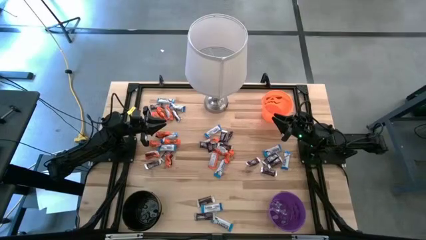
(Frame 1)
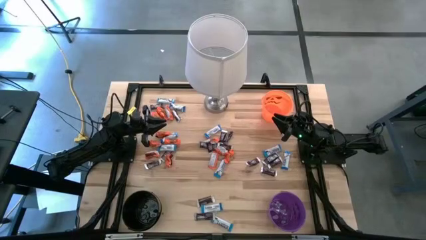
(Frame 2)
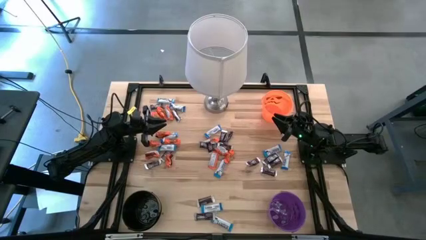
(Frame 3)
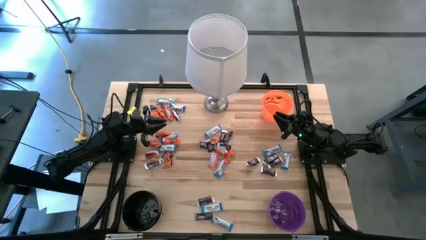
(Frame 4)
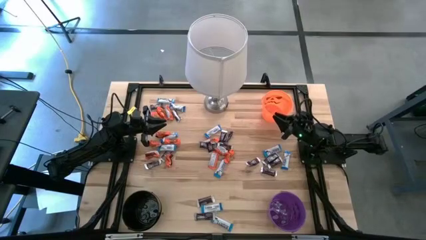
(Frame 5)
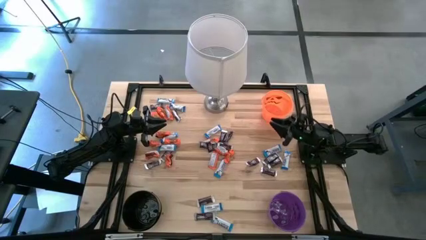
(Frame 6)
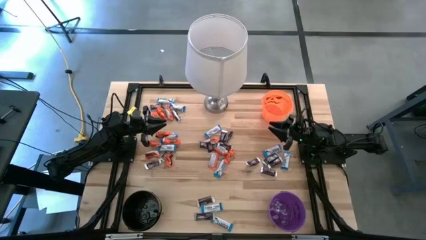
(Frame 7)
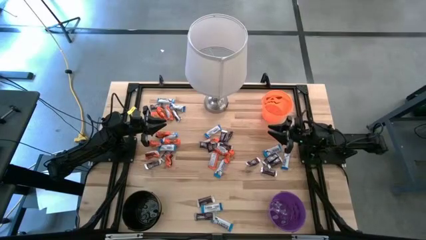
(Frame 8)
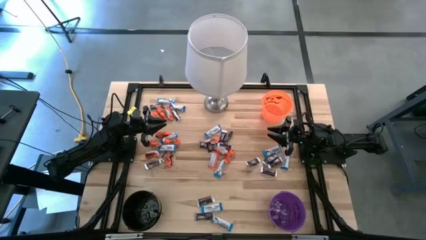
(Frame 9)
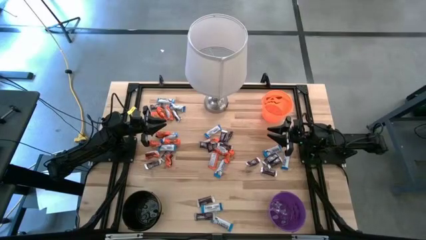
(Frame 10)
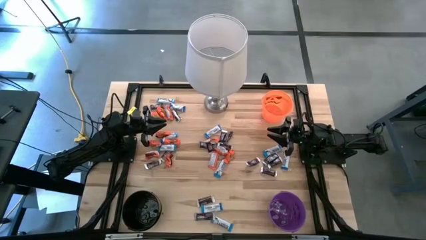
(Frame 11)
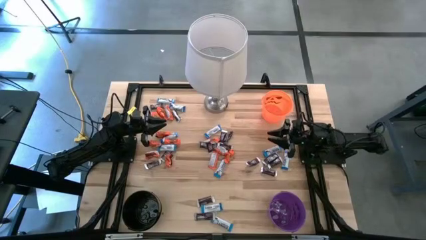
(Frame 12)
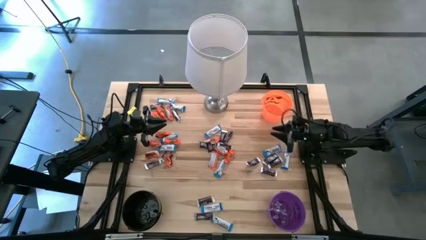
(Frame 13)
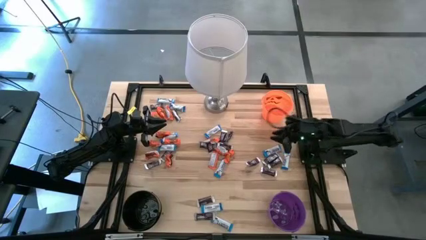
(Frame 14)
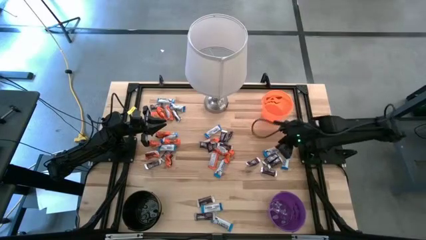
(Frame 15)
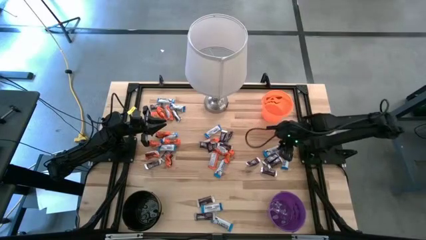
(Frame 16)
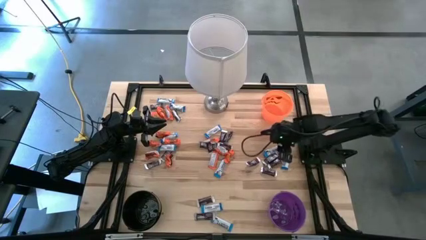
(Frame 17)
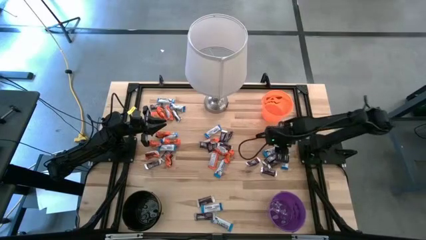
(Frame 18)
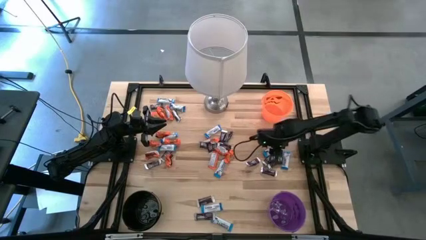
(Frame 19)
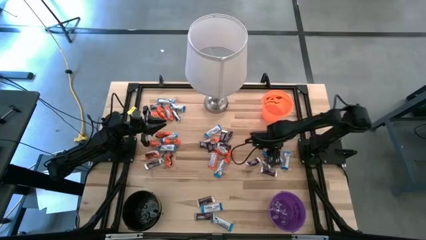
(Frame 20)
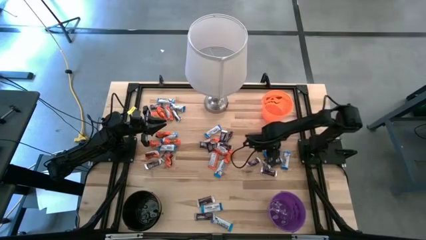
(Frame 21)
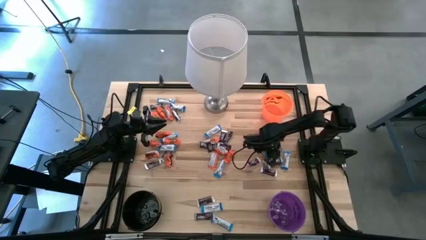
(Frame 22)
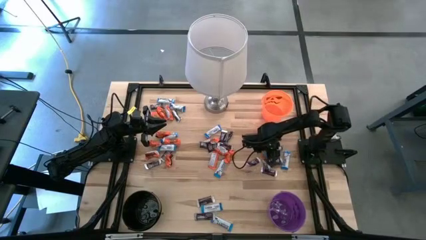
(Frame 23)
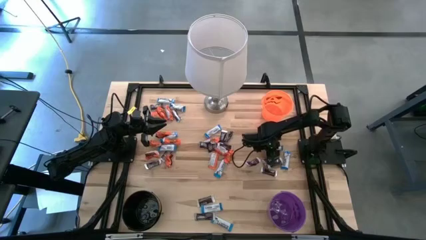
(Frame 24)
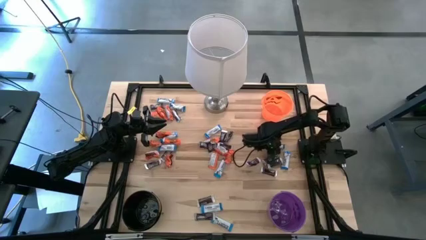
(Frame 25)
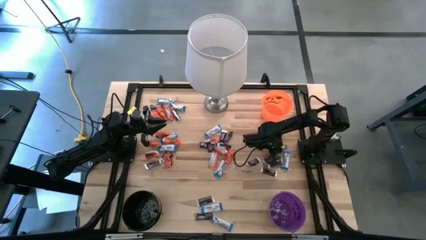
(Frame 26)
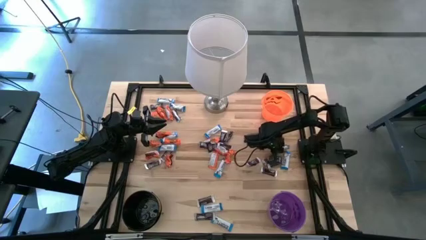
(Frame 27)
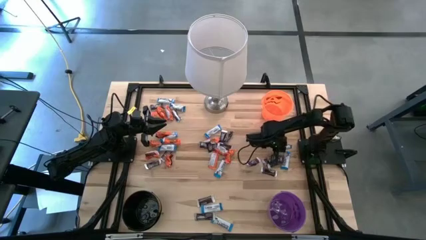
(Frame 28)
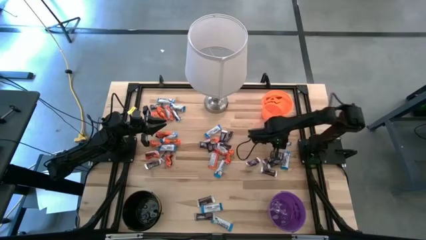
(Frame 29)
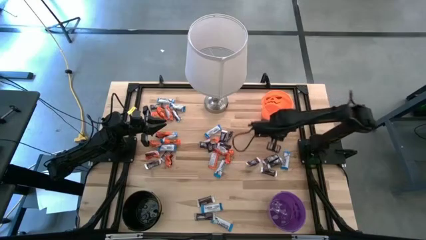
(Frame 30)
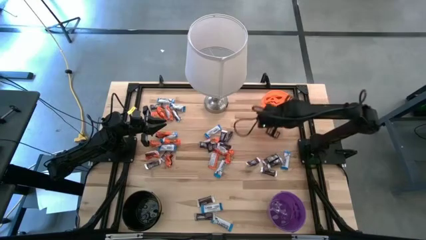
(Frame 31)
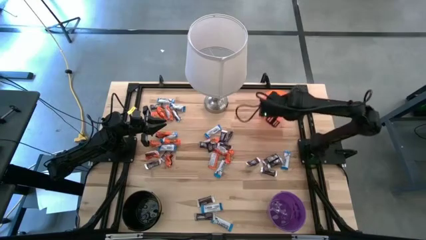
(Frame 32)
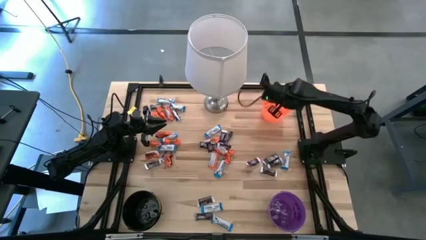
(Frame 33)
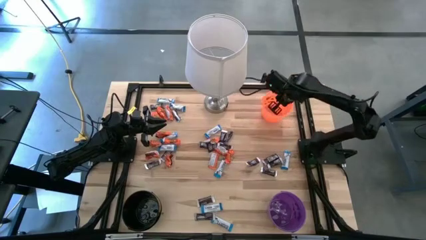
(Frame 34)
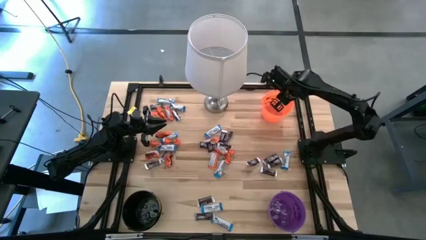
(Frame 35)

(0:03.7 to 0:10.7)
Task: Sort candy
Put the white chocolate bar into the orange bucket

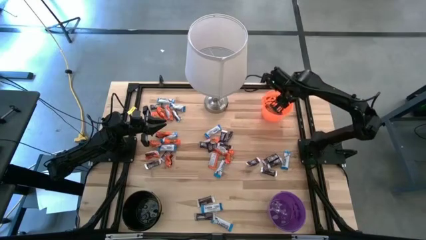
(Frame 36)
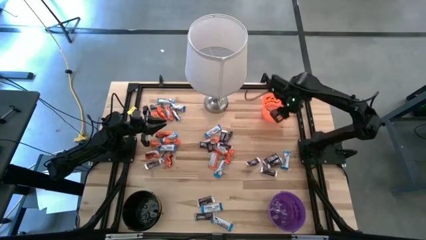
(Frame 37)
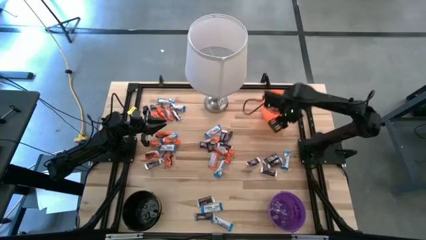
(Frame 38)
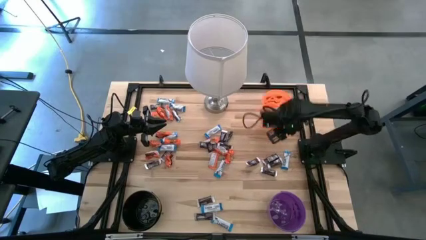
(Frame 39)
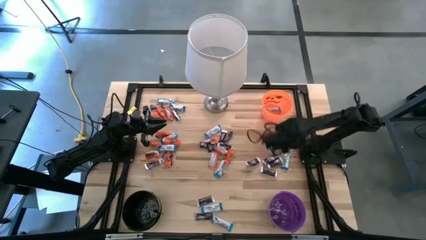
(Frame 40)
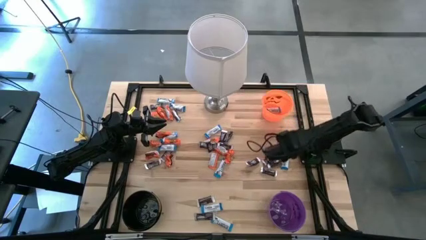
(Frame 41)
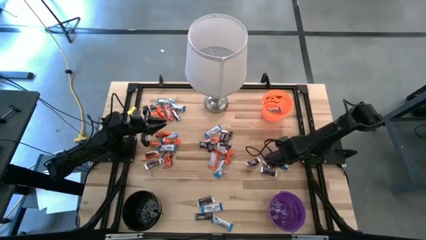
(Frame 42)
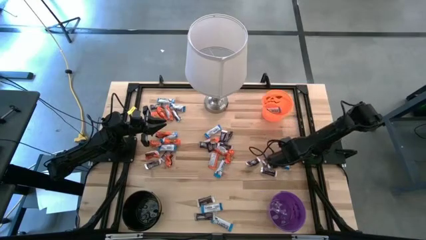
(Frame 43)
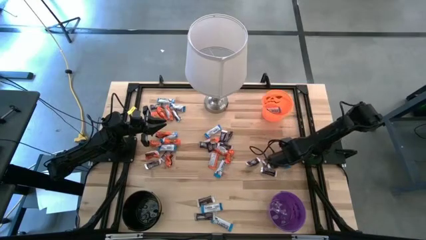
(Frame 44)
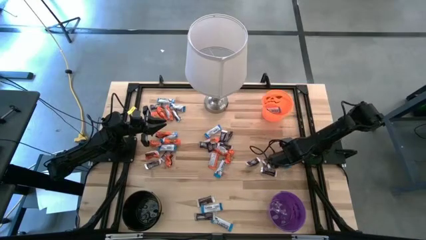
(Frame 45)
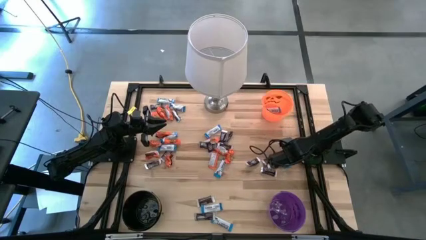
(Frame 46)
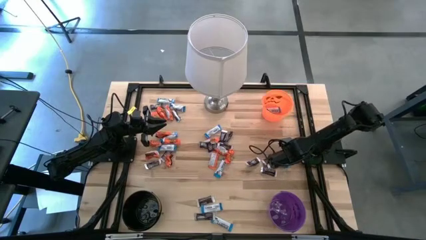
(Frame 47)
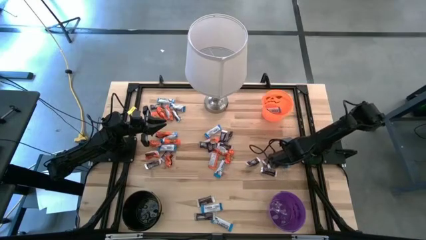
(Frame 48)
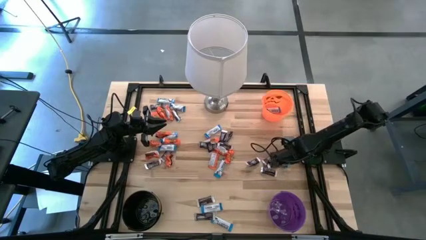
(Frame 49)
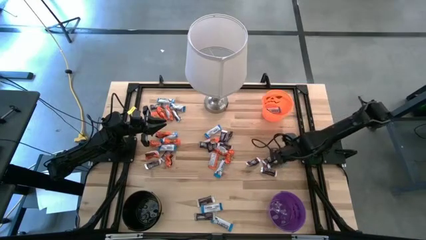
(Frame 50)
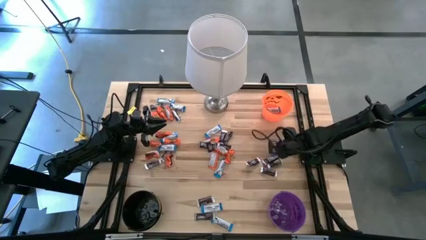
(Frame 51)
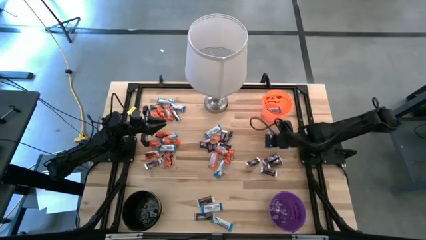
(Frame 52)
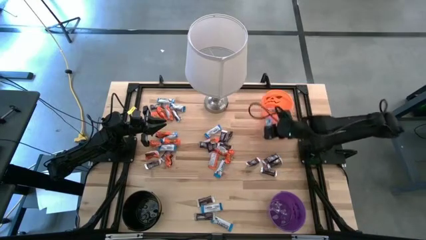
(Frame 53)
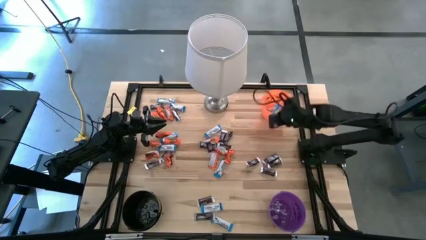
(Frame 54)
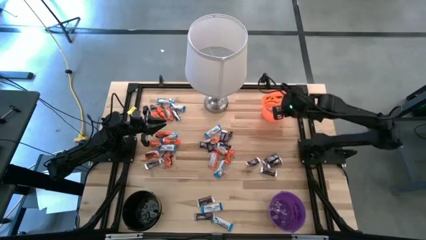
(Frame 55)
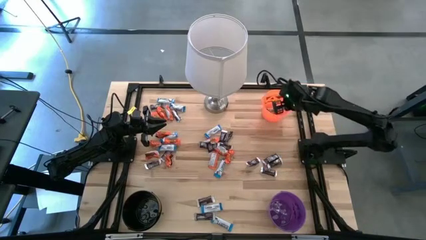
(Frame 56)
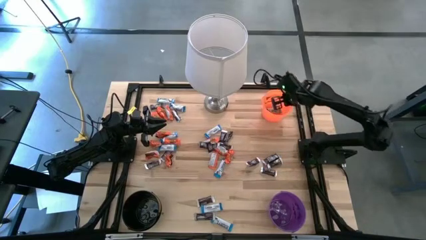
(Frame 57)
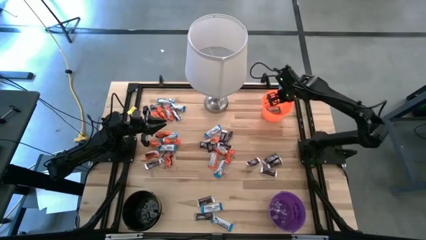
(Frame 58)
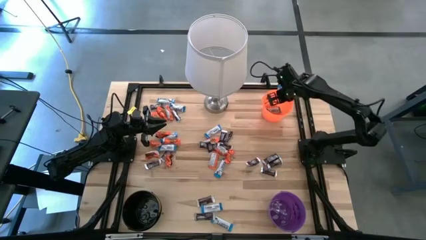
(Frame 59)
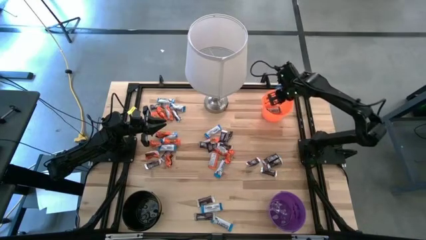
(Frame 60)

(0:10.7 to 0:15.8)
Put the white chocolate bar into the orange bucket

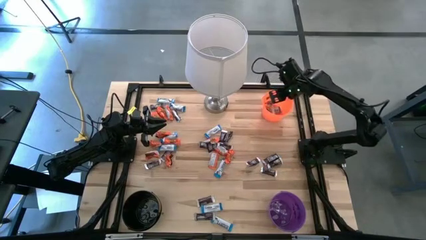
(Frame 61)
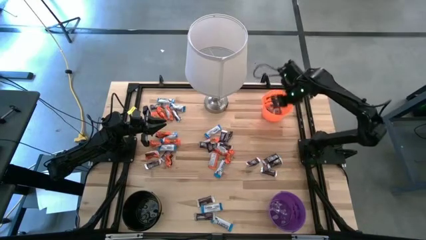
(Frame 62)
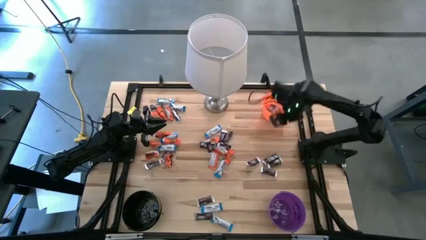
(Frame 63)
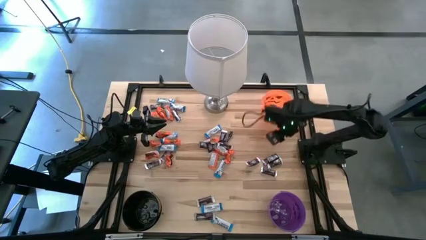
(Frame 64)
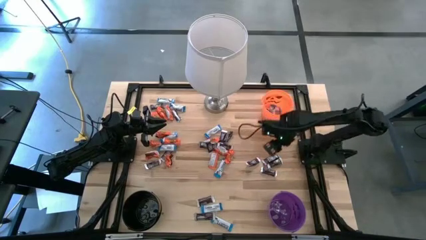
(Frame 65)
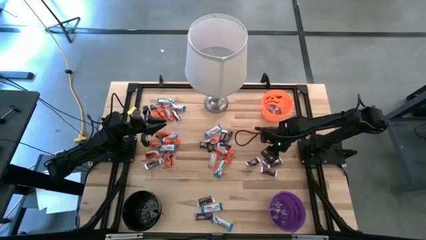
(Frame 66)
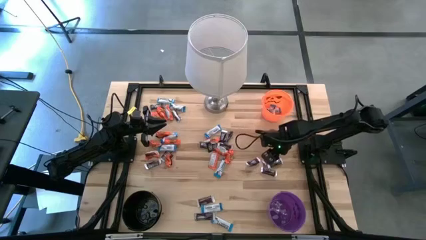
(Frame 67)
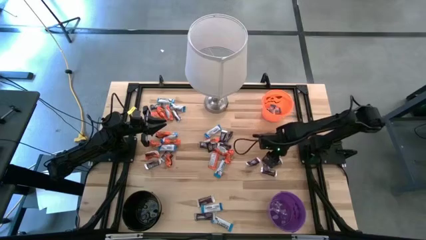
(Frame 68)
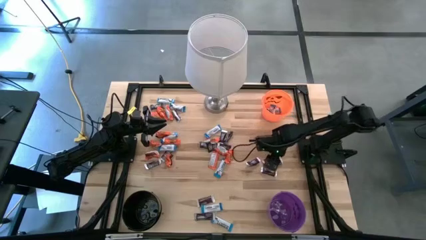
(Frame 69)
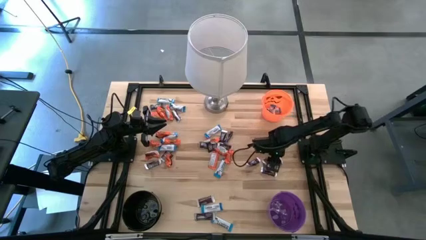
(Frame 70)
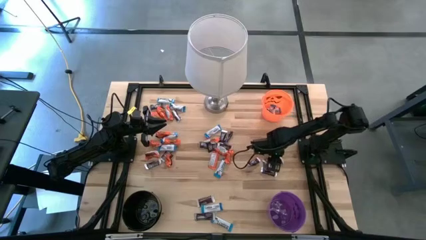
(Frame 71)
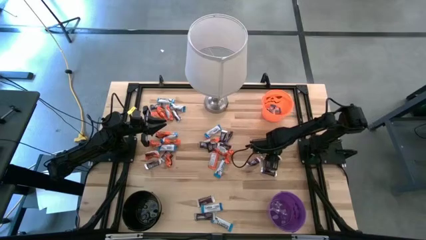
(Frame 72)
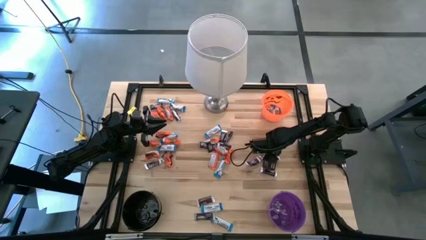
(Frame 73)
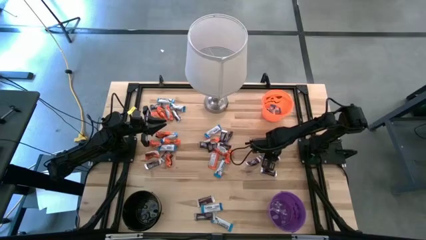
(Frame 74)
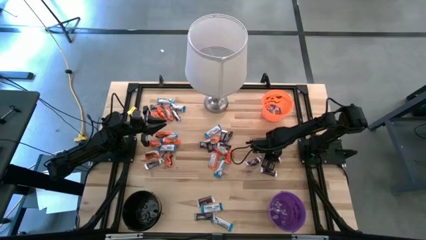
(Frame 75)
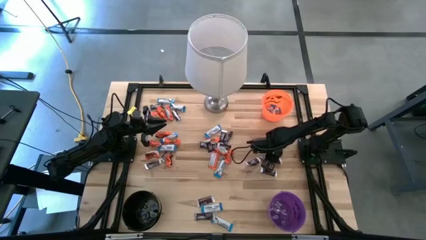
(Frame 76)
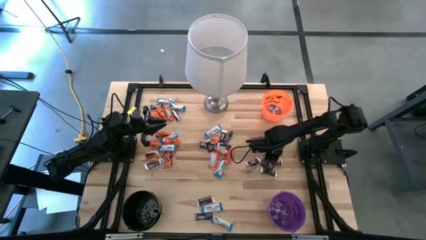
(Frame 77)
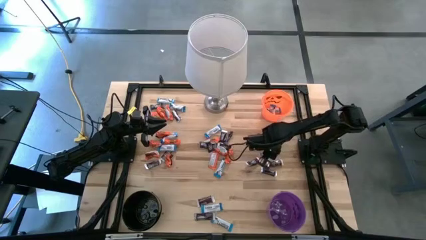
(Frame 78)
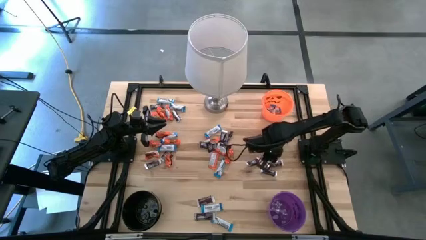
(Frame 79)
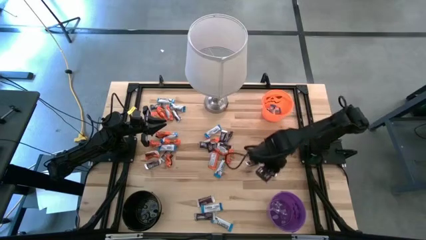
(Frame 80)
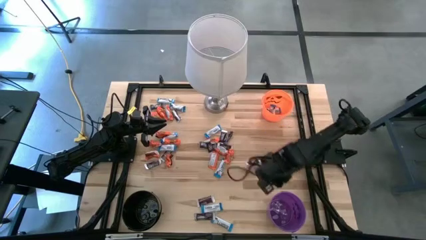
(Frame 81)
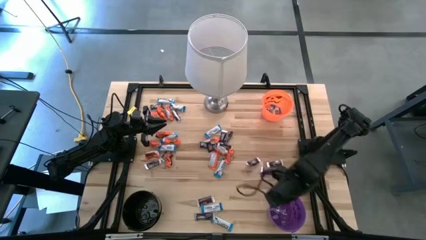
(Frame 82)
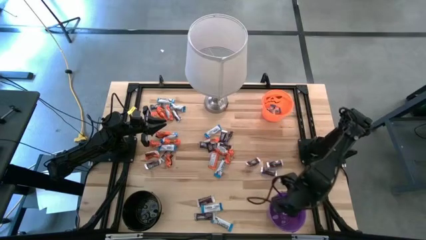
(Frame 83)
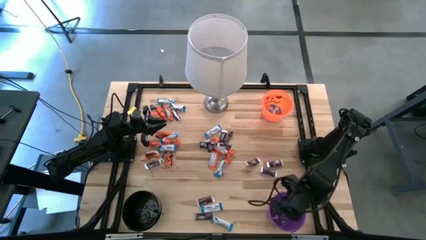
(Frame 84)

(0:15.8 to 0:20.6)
Put the brown chocolate bar into the violet bucket
